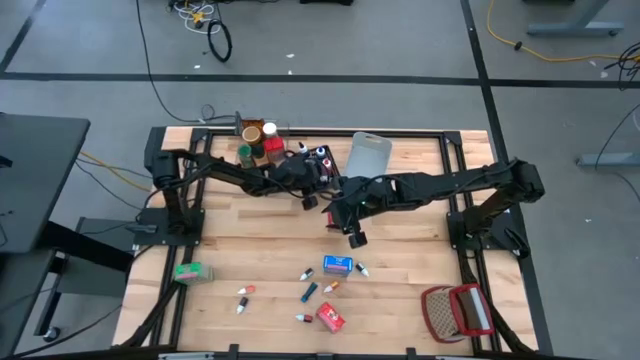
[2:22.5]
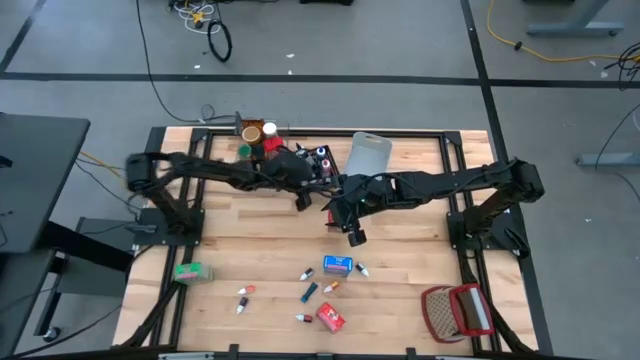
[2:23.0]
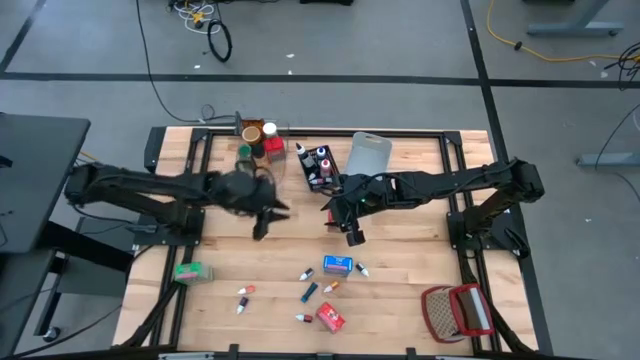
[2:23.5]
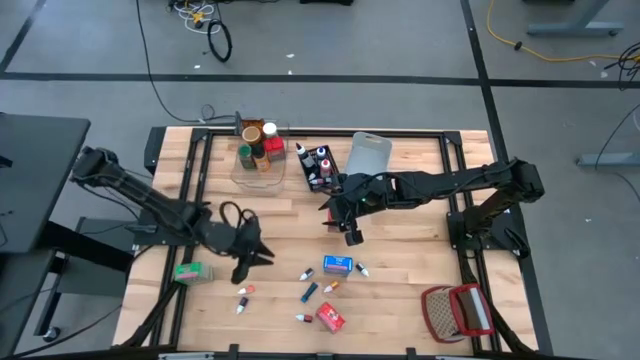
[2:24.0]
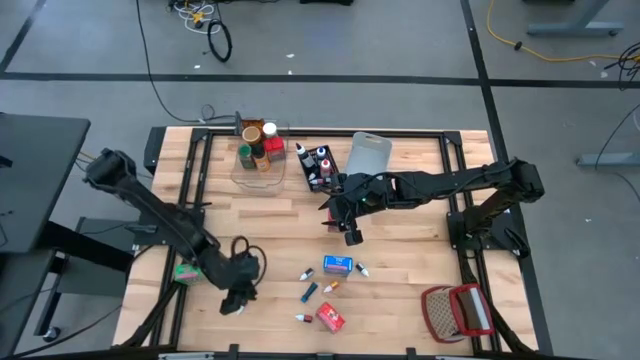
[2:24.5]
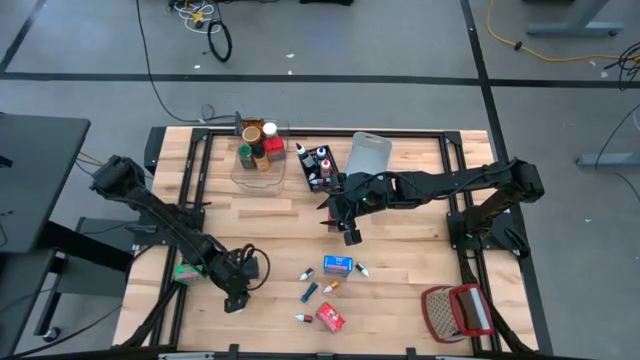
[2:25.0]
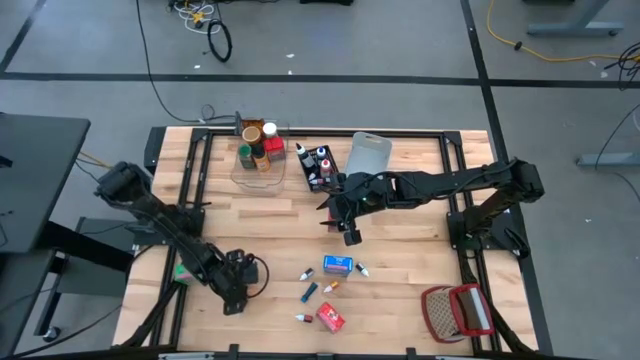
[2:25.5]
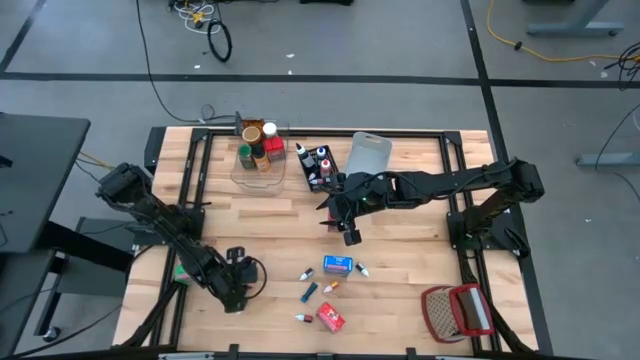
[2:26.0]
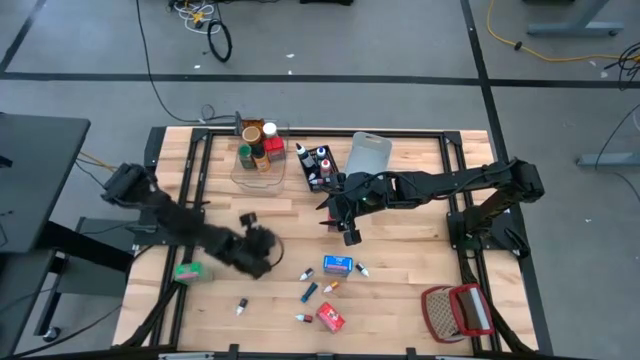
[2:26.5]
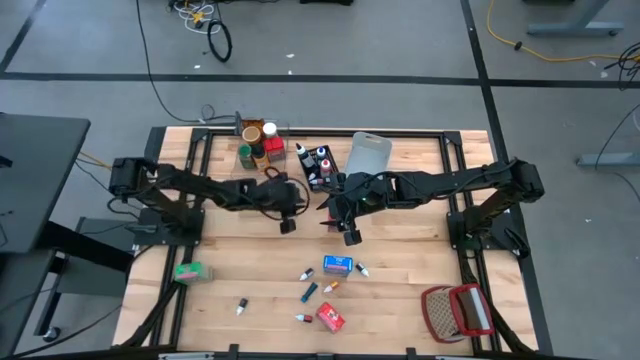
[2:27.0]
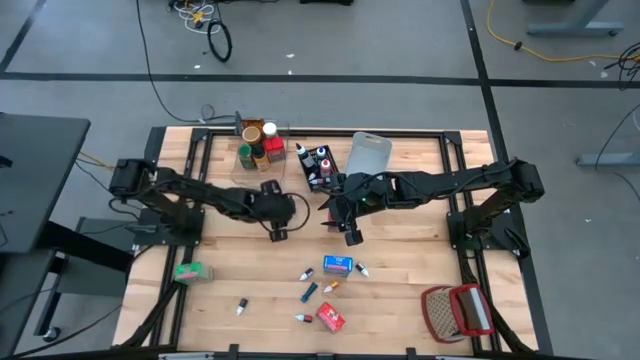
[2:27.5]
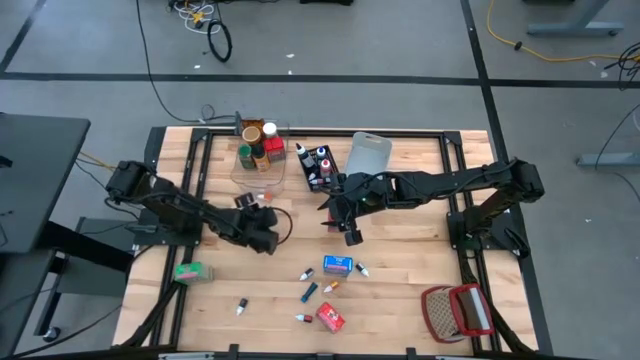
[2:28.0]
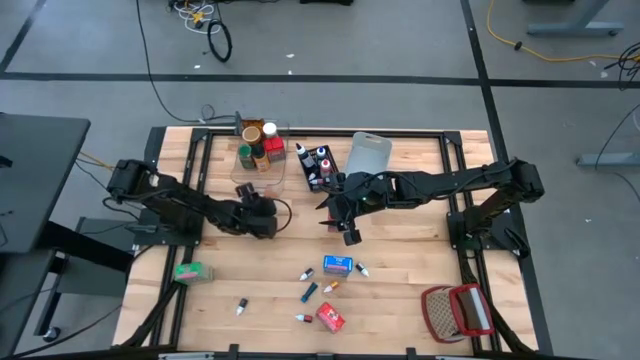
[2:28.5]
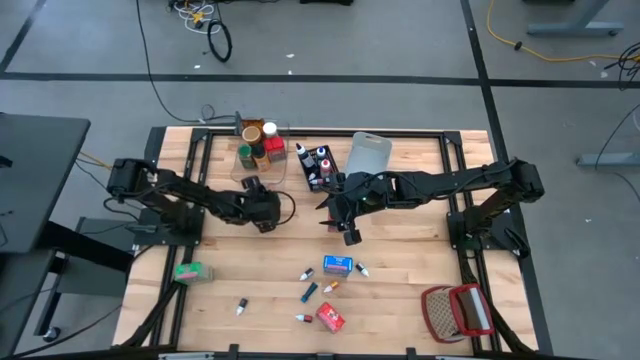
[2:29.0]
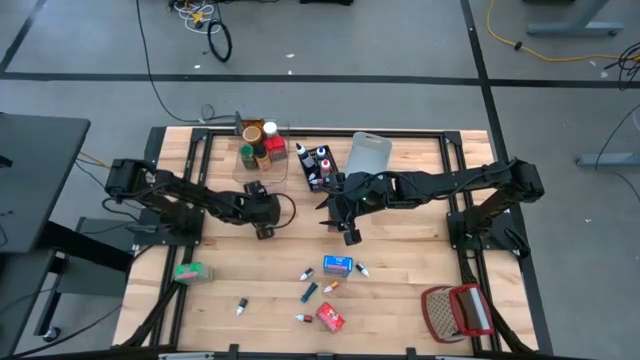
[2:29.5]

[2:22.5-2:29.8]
Task: Pick & Place Kitchen Items
Put the left yellow food coloring bottle into the black bin

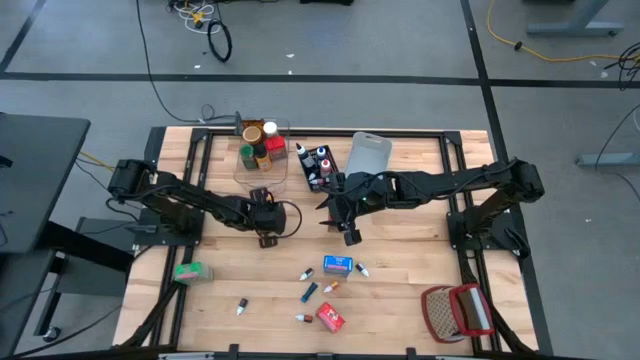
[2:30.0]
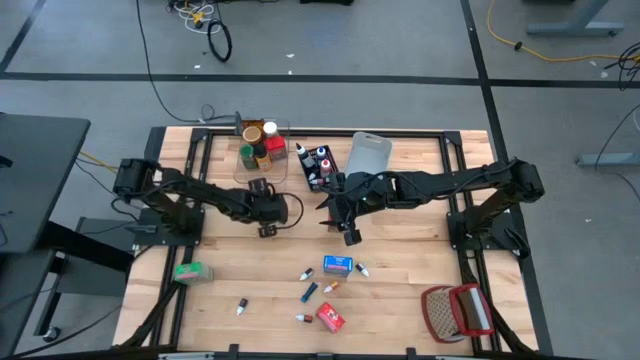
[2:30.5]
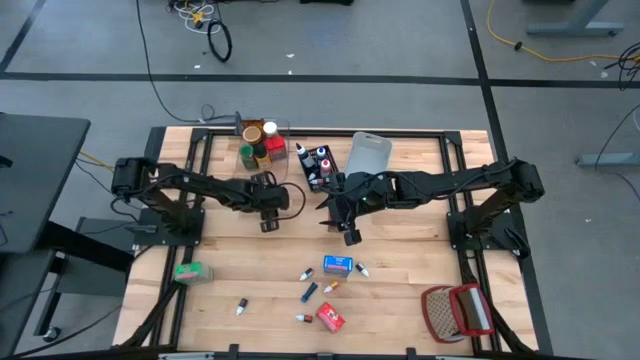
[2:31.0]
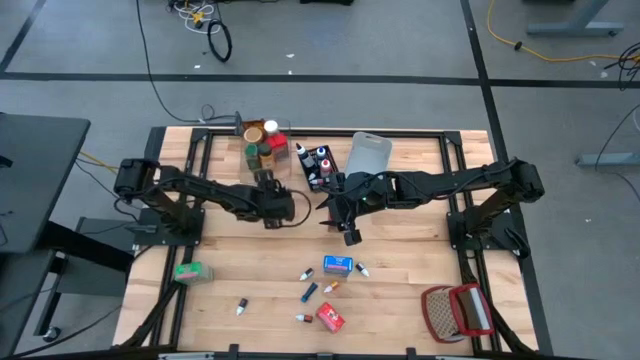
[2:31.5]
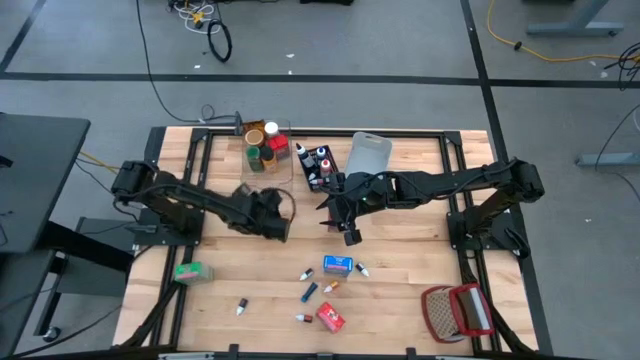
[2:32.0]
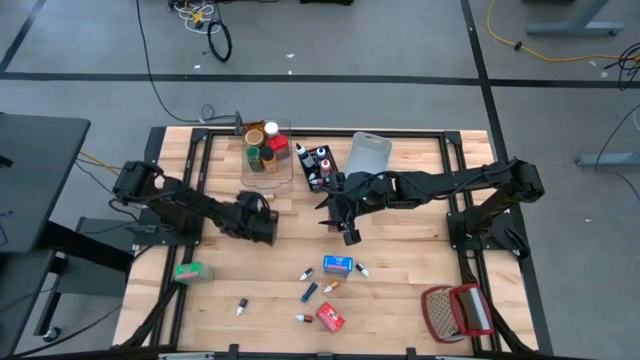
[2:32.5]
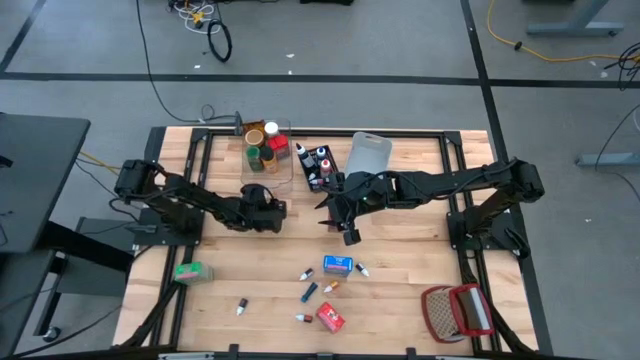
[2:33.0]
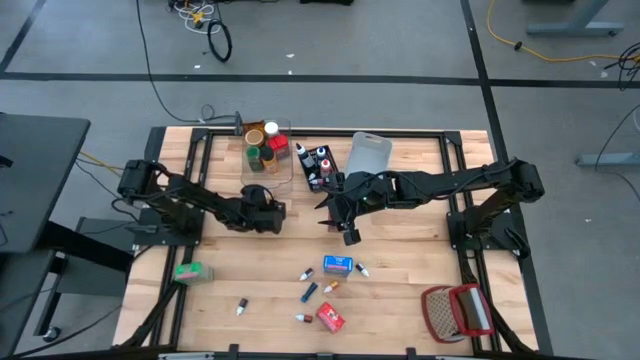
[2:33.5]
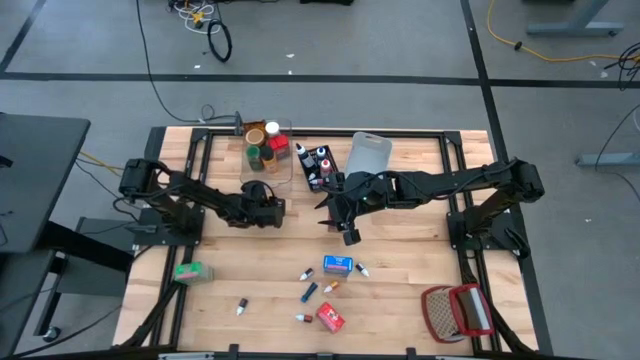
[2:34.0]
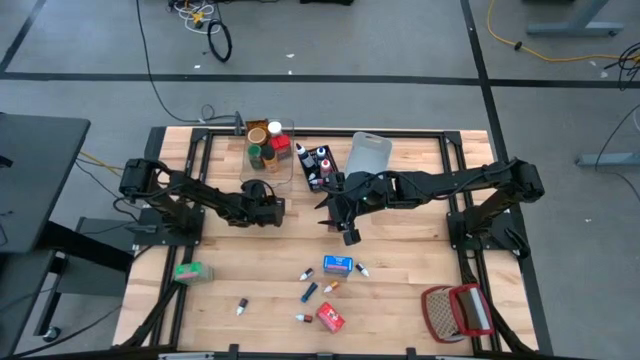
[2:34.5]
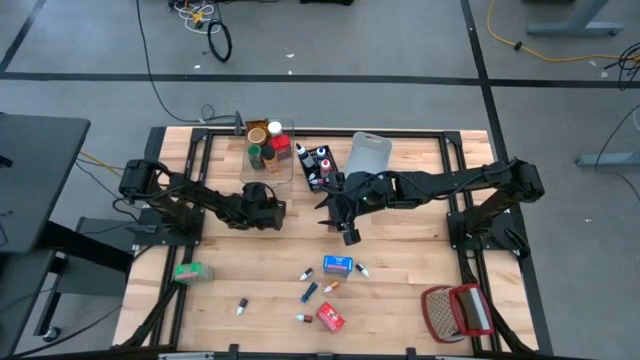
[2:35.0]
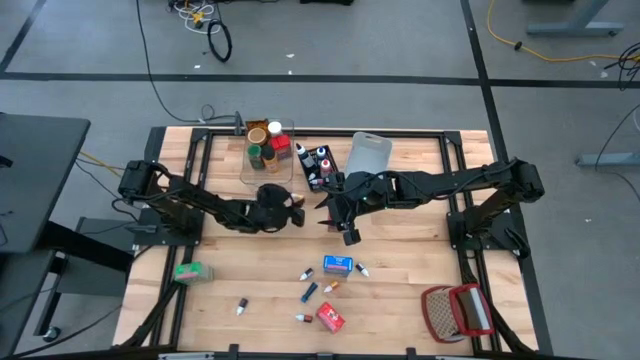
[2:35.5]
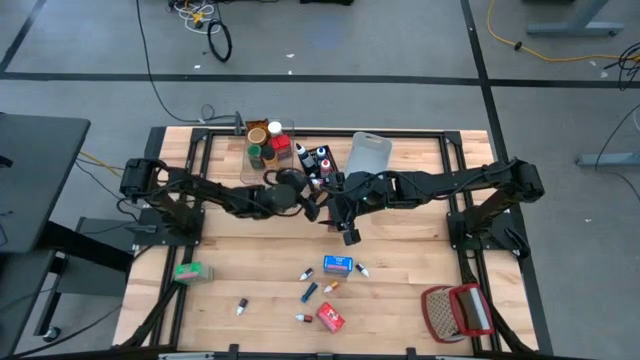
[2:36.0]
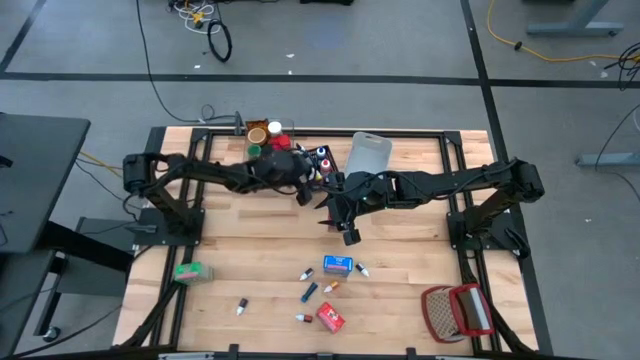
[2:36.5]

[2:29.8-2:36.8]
Put the top yellow food coloring bottle into the black bin

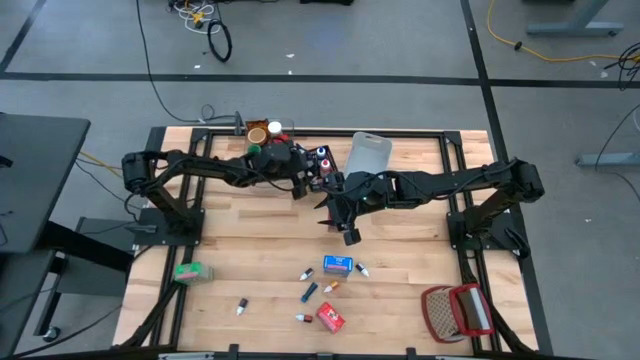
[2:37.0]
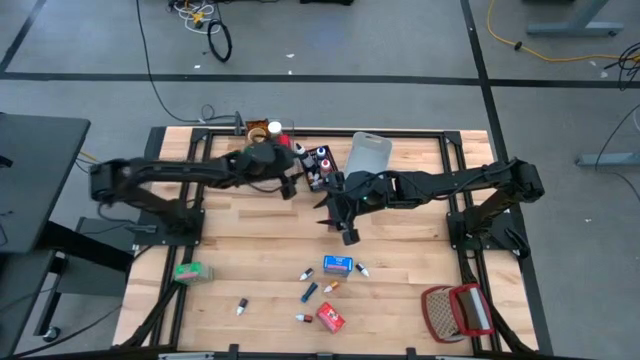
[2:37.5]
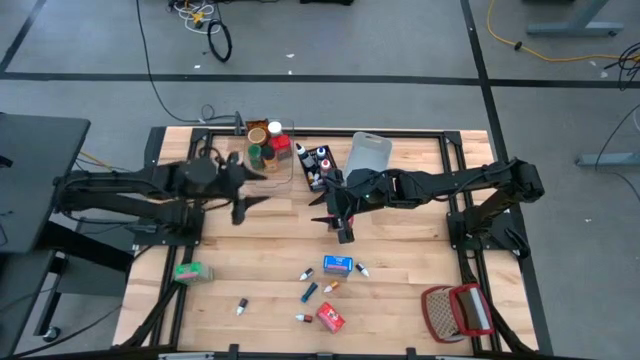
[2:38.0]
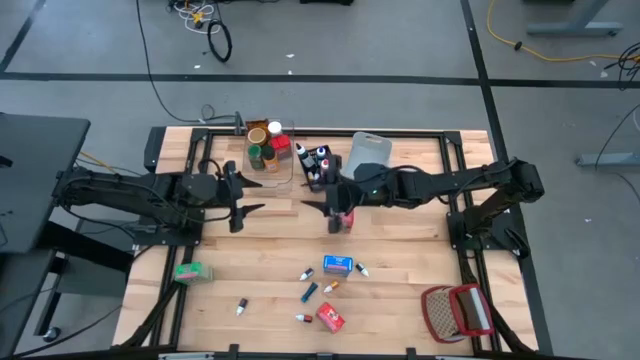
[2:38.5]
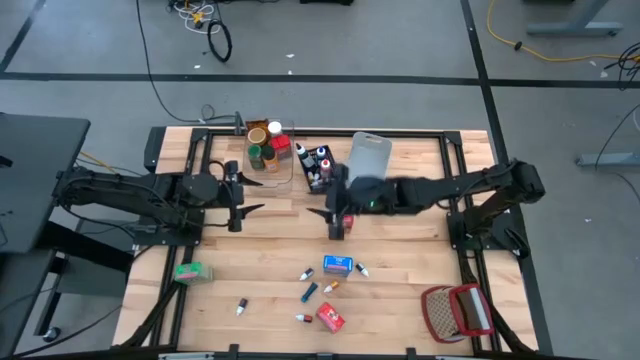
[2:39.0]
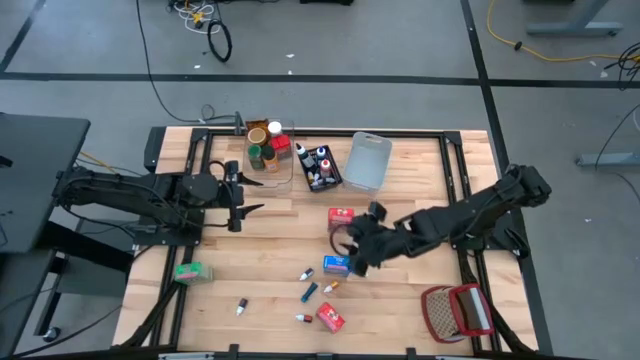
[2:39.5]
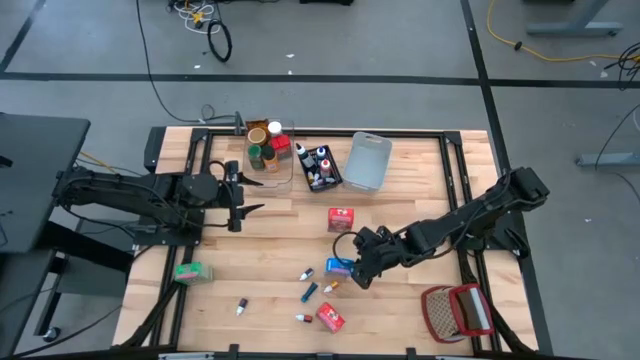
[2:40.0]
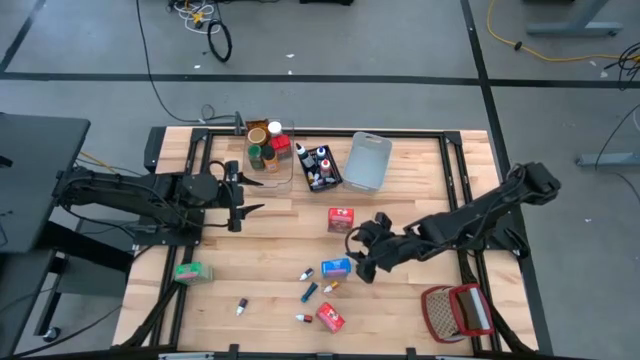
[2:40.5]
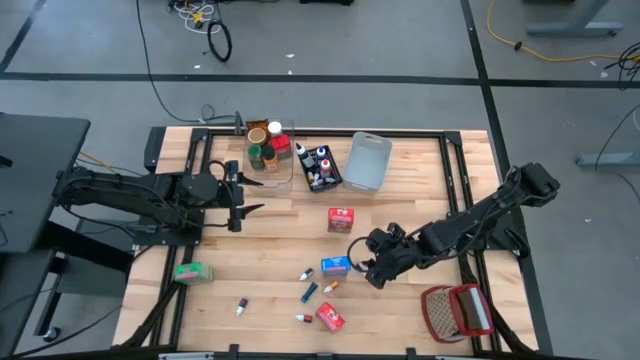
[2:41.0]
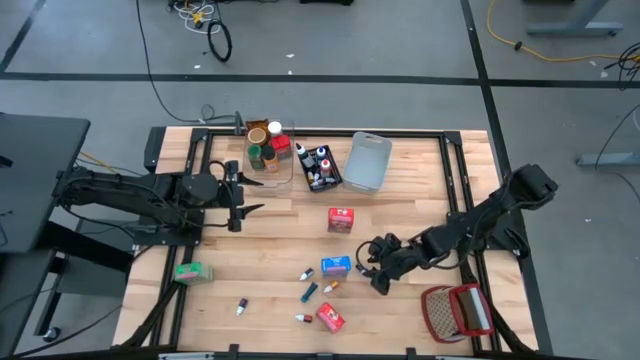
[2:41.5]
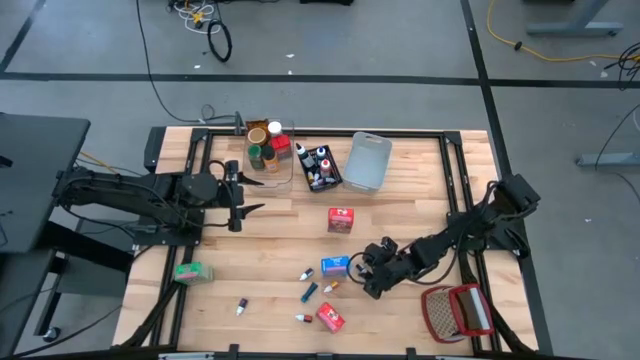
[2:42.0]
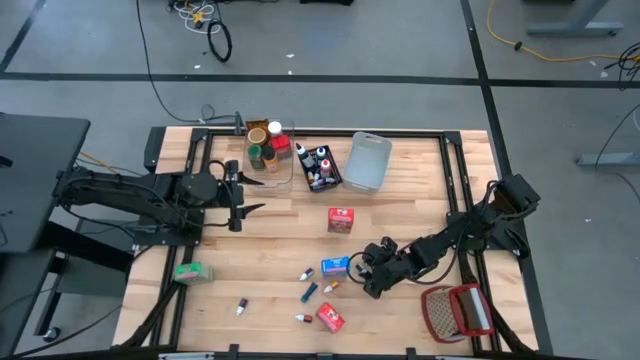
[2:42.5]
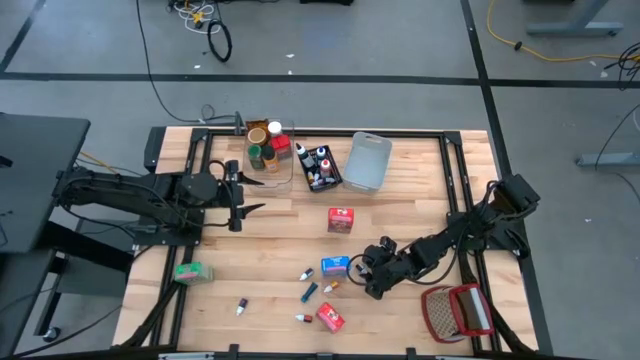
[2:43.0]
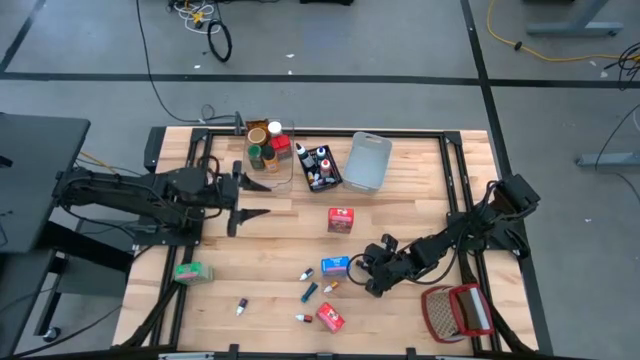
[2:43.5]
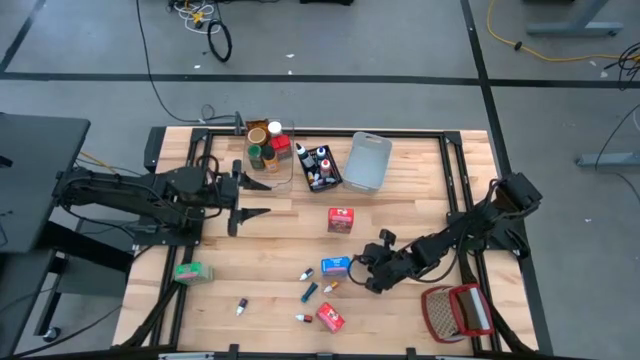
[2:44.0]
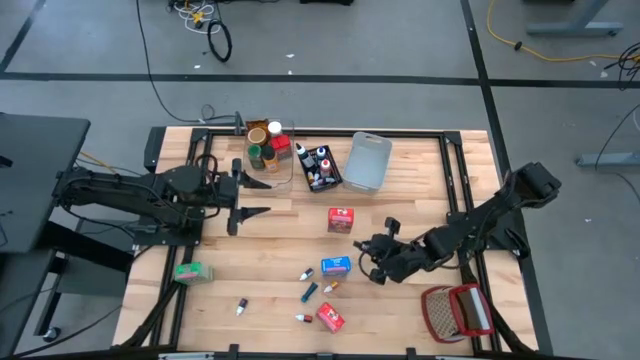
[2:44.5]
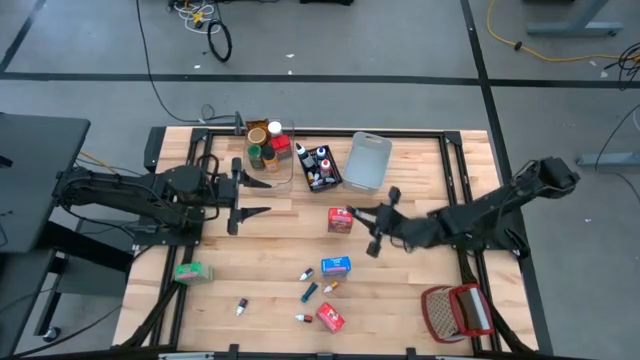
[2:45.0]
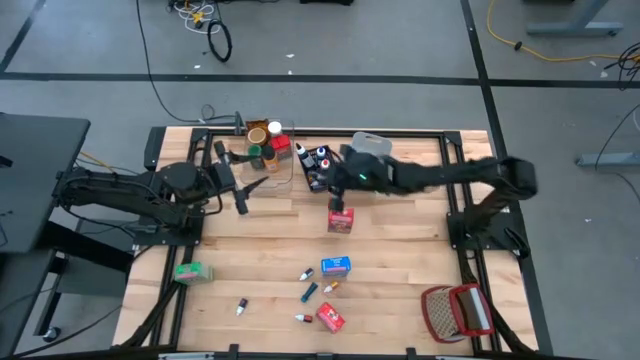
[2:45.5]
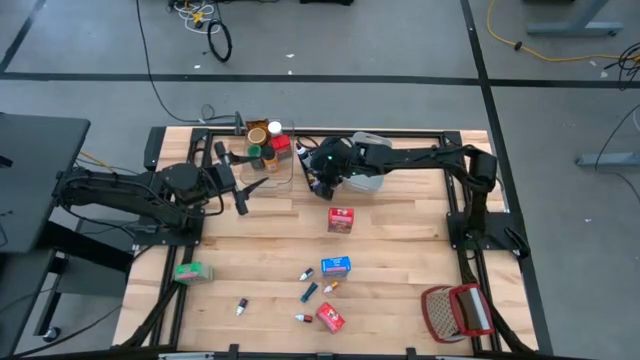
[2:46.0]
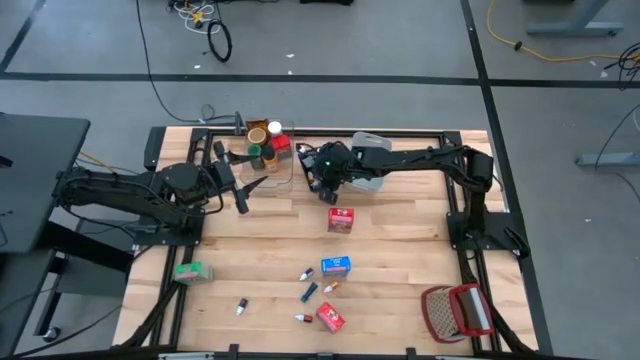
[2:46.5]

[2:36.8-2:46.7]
Put the right black food coloring bottle into the black bin
